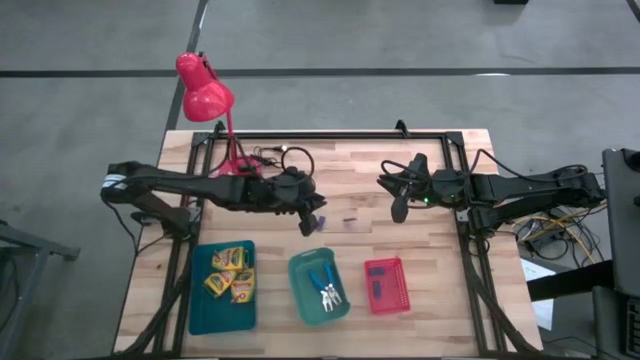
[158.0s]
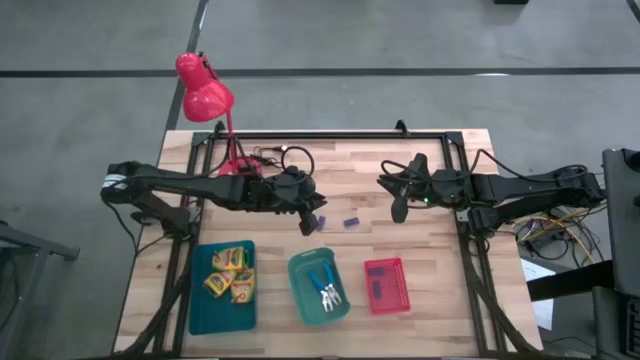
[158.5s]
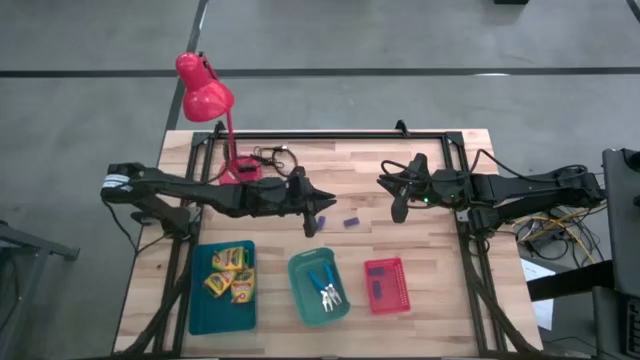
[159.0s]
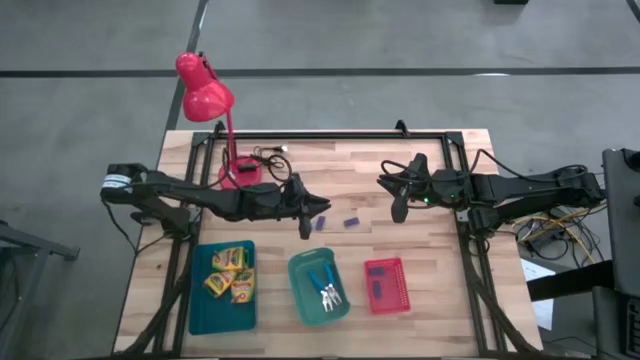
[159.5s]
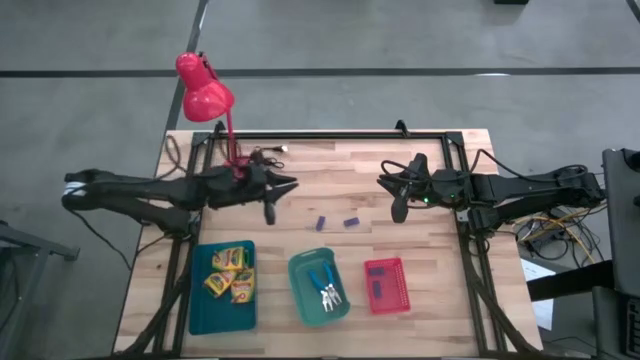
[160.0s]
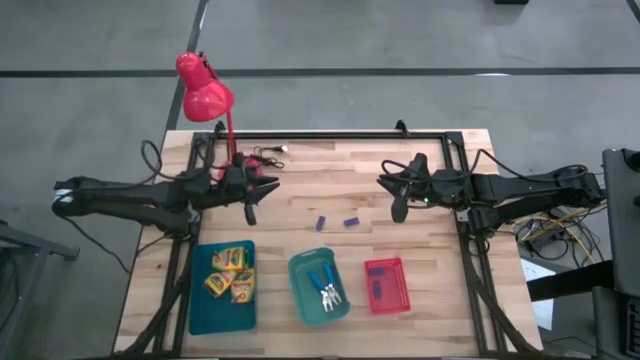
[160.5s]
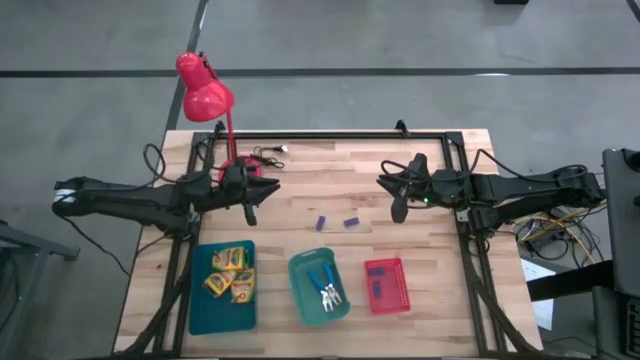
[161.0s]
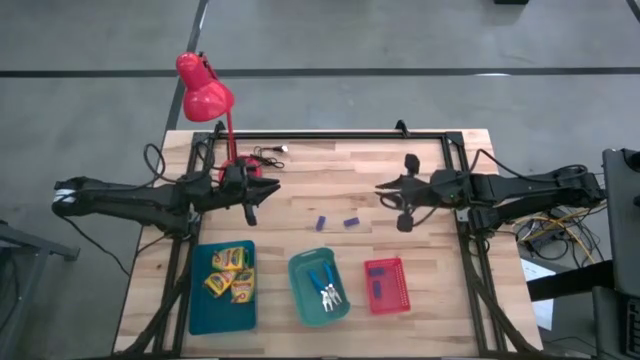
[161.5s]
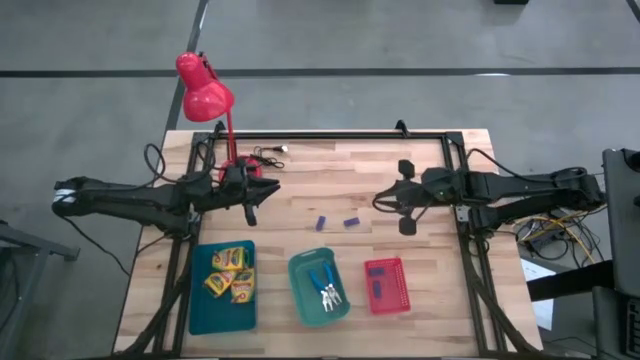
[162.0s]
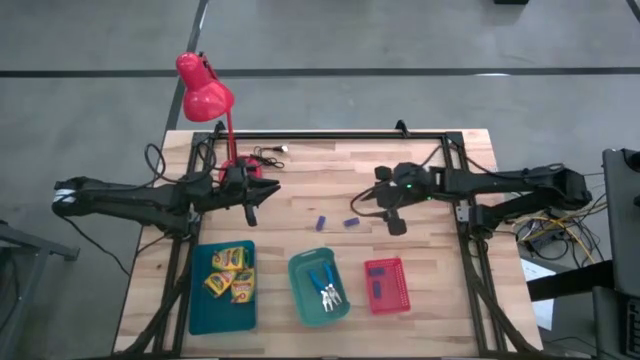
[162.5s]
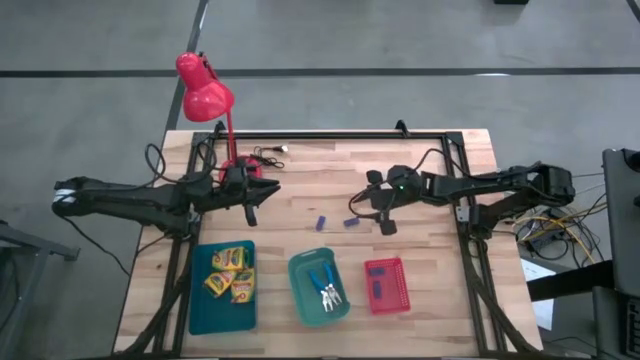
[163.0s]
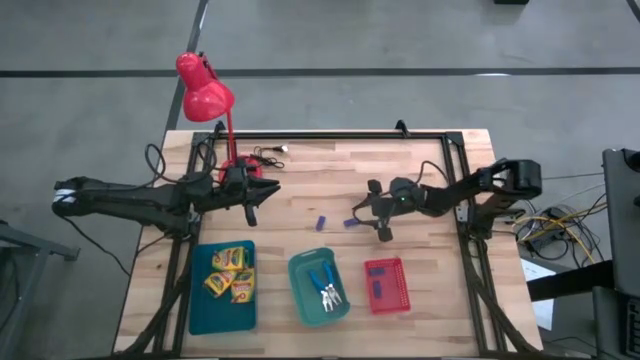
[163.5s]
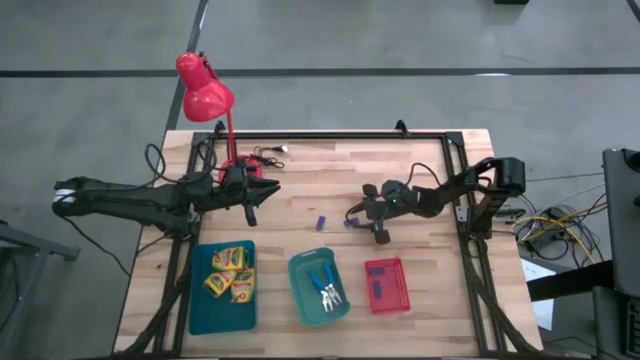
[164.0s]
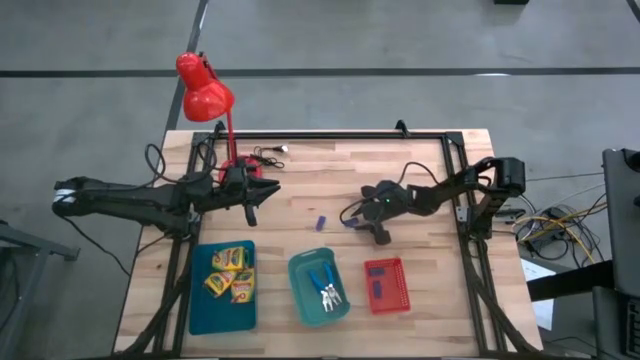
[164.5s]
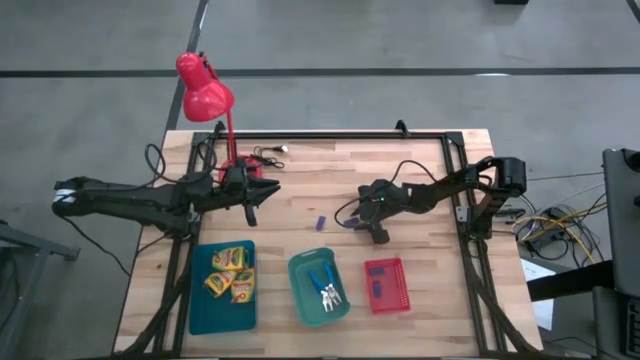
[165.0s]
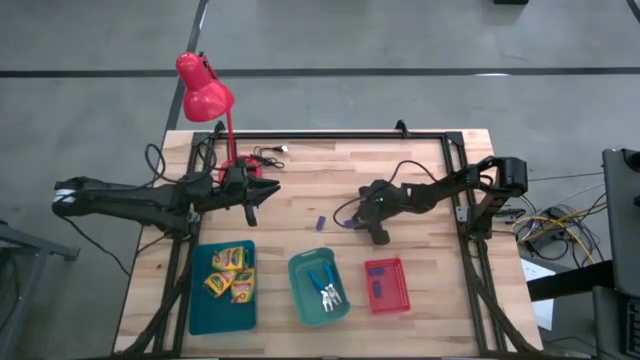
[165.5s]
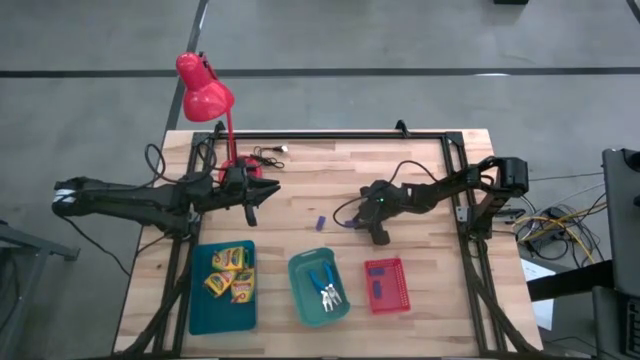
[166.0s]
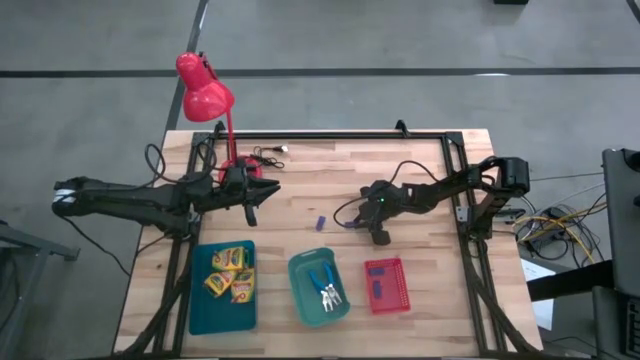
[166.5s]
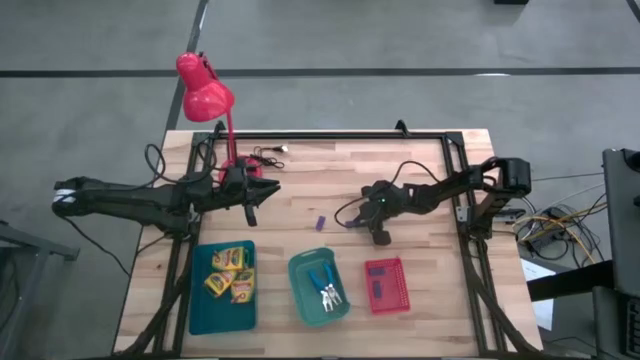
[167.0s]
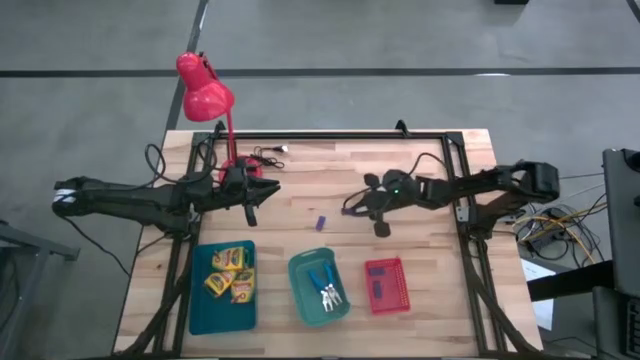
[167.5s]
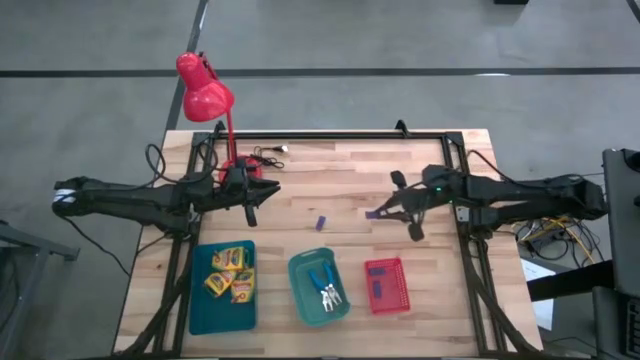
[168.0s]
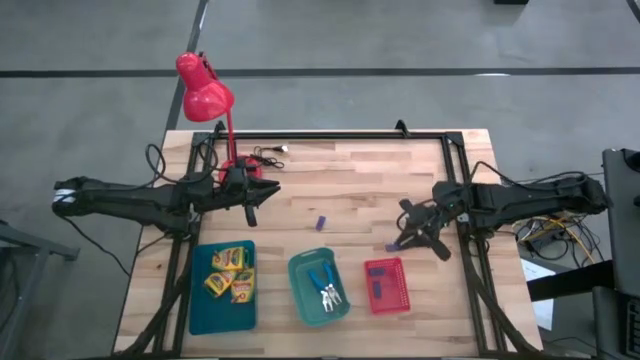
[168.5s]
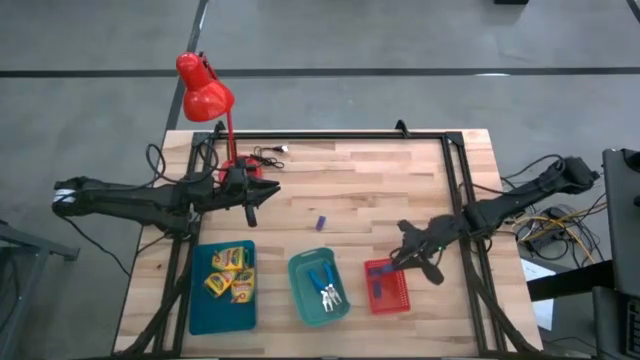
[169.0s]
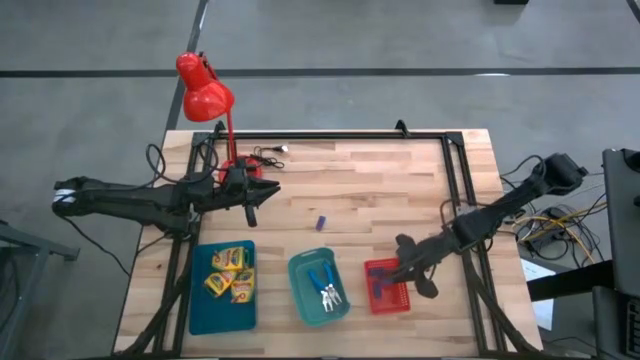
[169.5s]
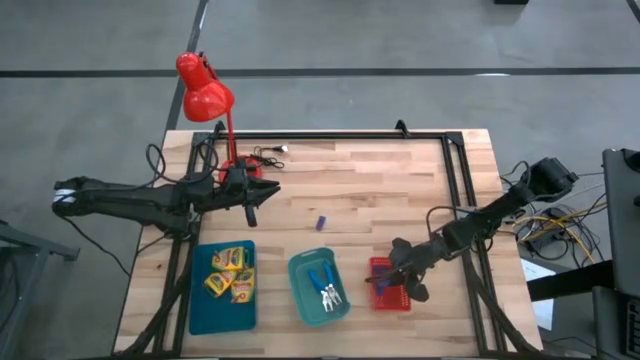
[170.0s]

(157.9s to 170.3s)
Task: Pick & Place School Supplies
Put the purple eraser into the red bin

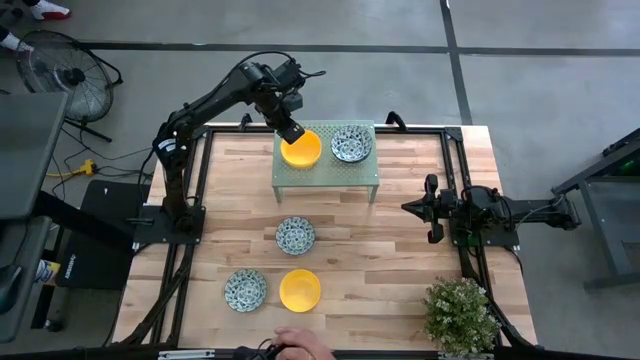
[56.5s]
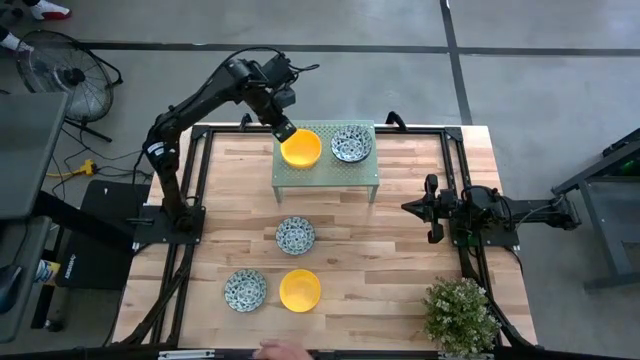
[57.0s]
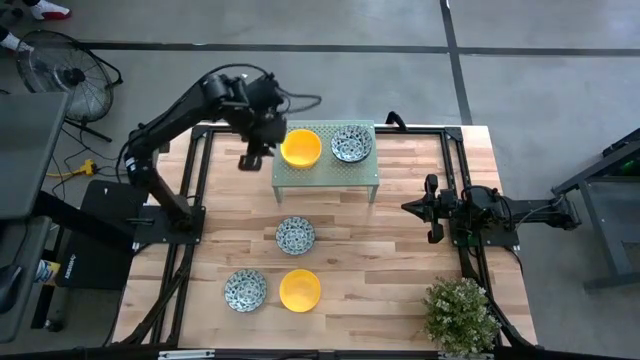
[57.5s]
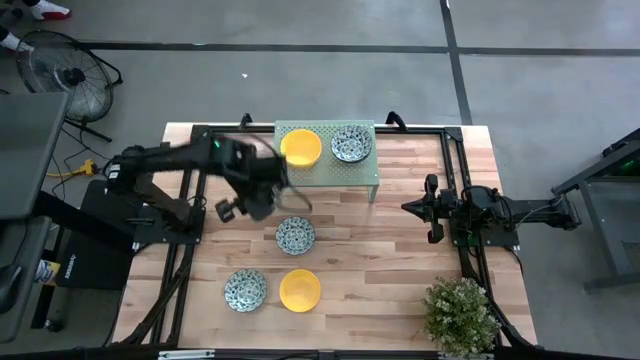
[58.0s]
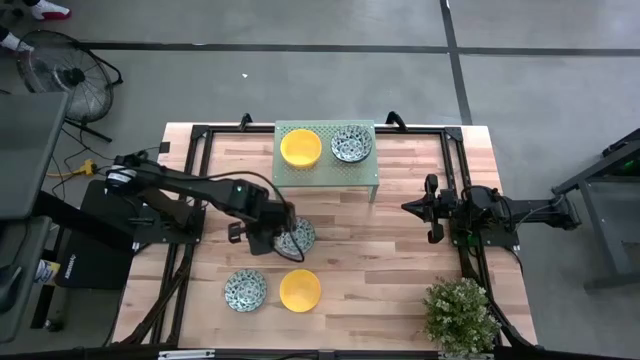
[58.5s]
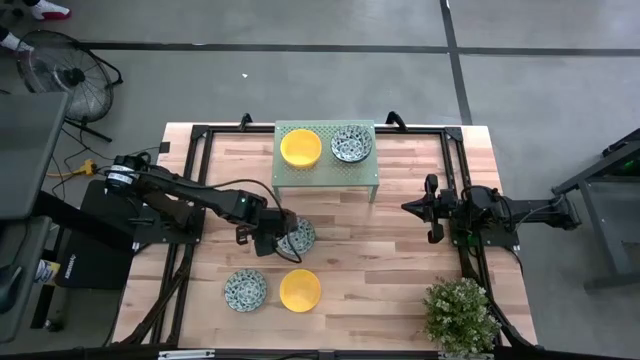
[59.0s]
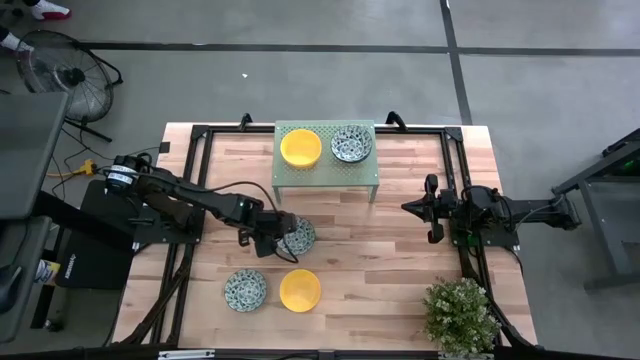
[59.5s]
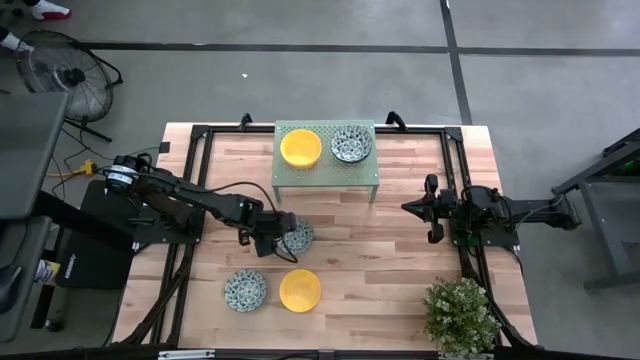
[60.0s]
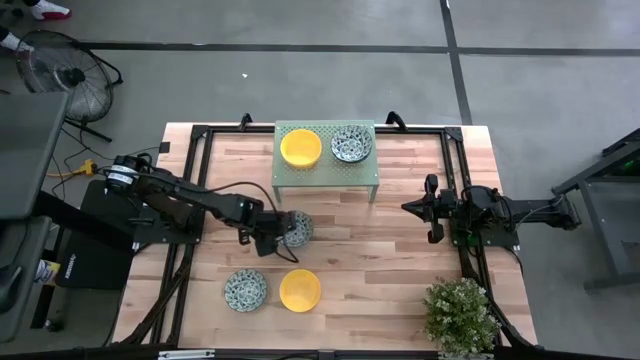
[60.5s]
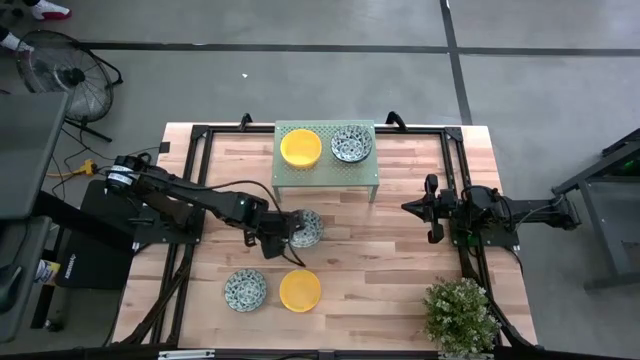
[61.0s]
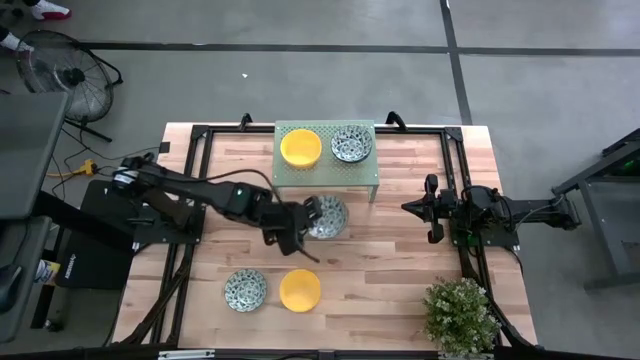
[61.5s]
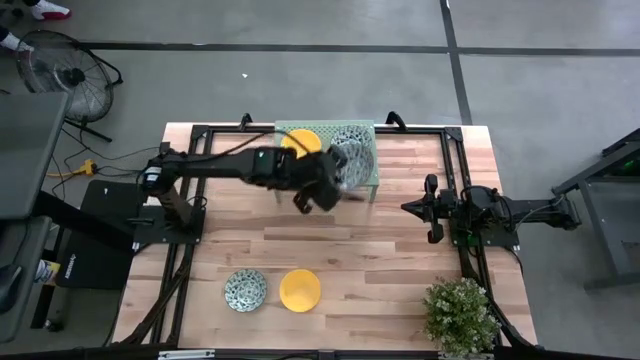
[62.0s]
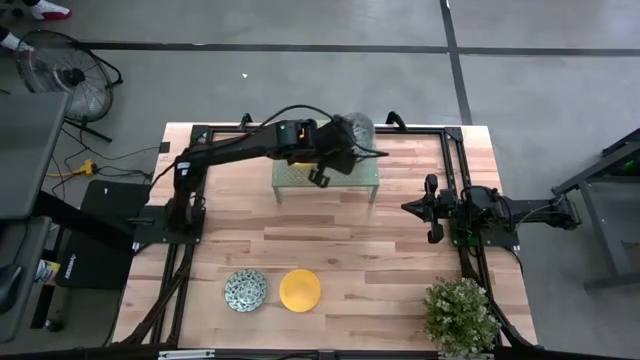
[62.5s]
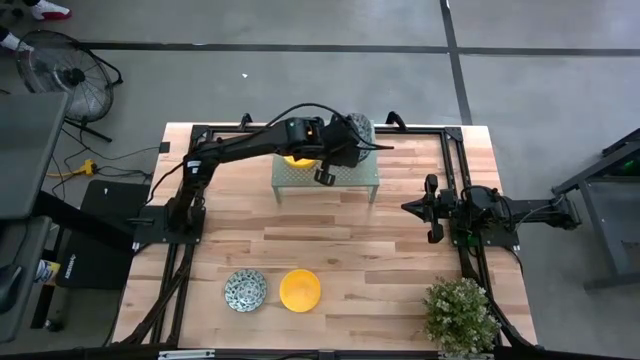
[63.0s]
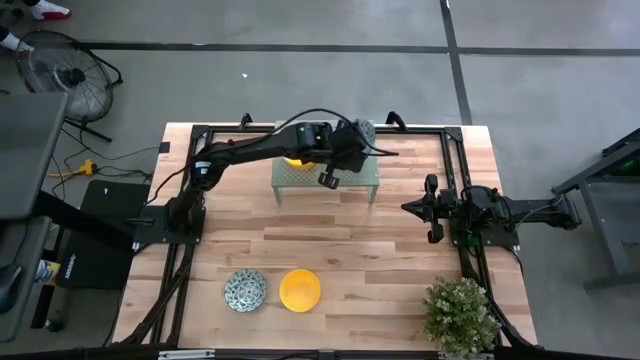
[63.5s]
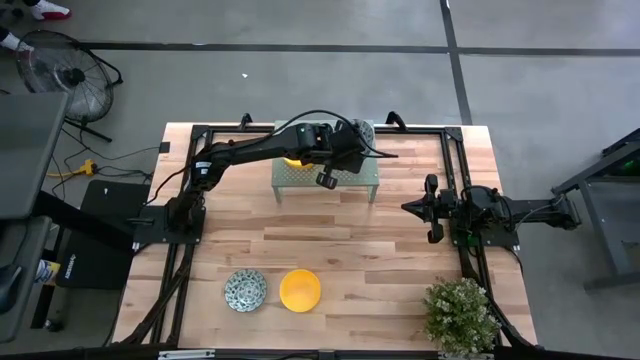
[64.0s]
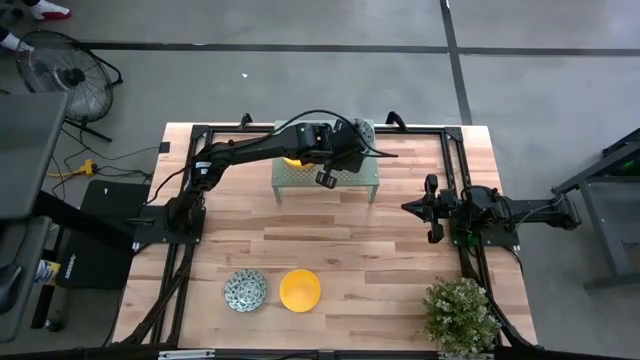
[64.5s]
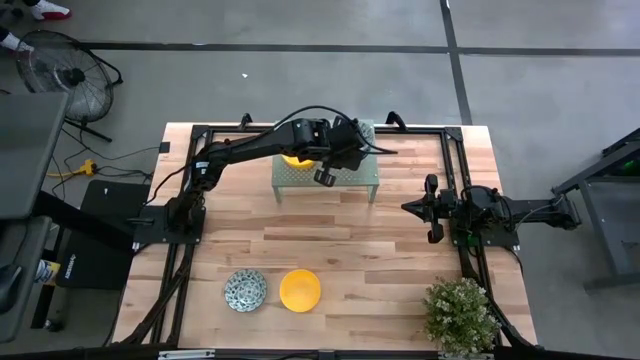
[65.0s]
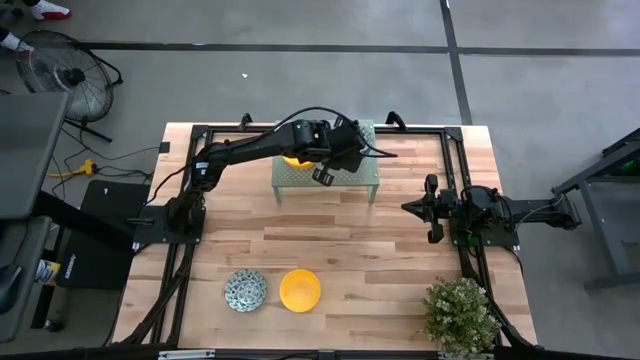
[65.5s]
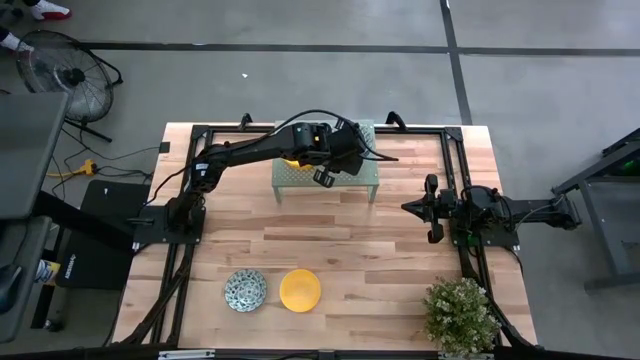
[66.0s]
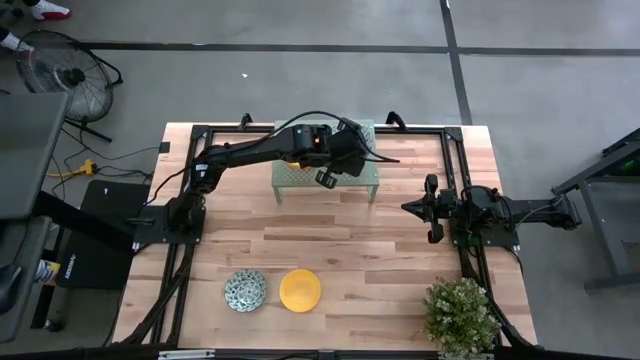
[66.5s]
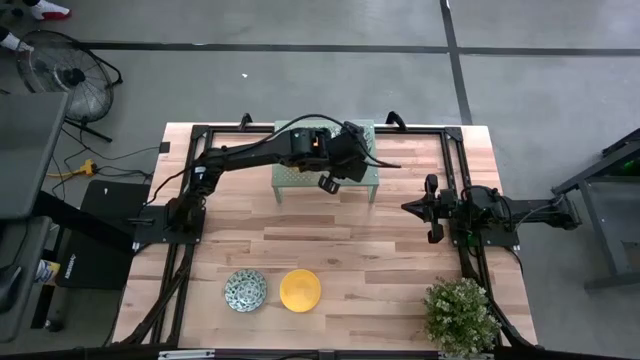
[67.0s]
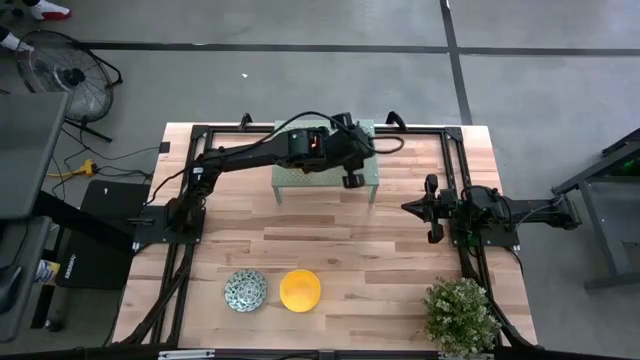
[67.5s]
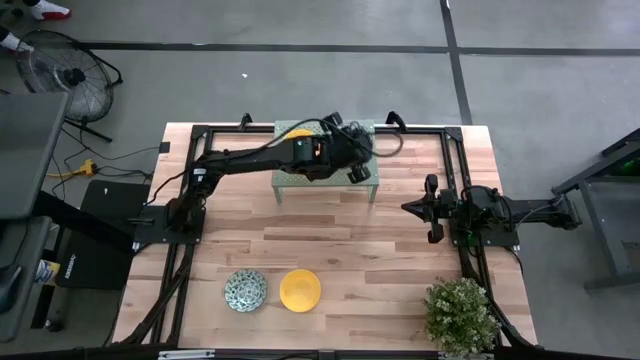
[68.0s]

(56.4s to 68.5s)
Task: Pick & Place Mini bowls
Stack the blue patterned bowl on the stacked blue patterned bowls on the shelf
